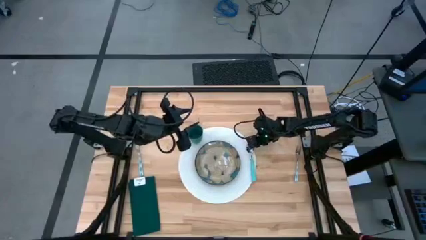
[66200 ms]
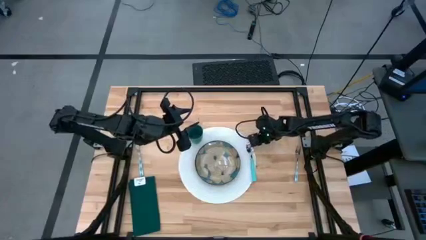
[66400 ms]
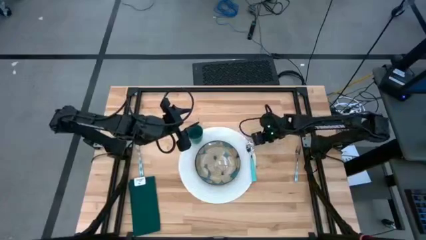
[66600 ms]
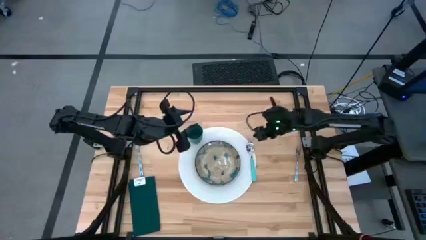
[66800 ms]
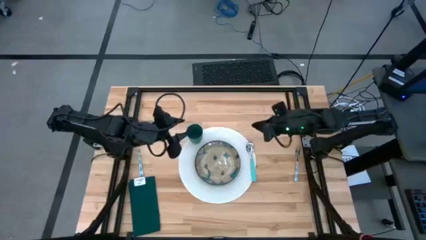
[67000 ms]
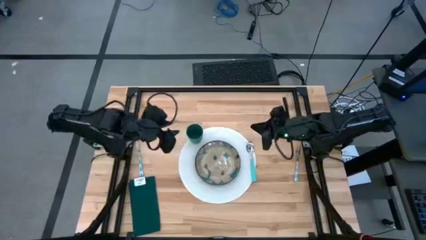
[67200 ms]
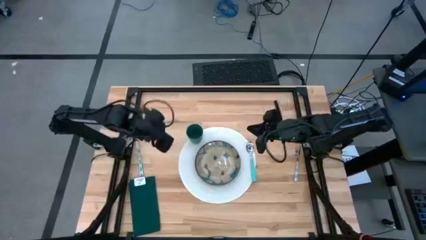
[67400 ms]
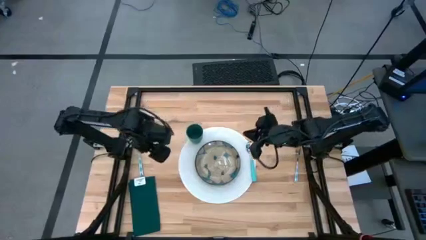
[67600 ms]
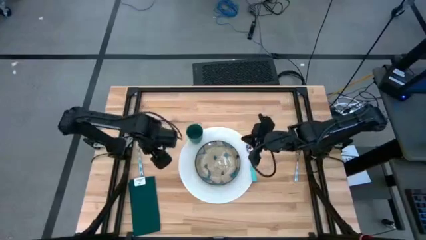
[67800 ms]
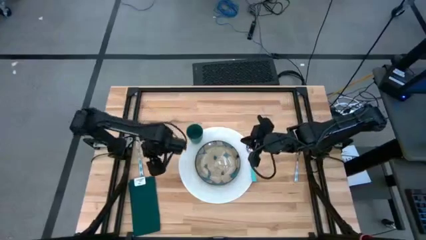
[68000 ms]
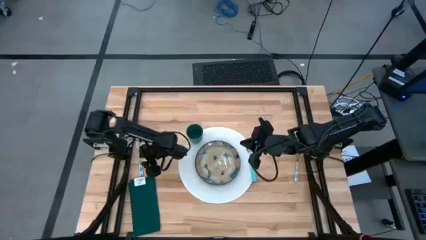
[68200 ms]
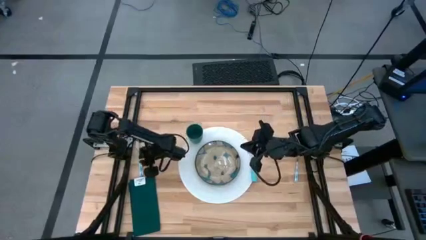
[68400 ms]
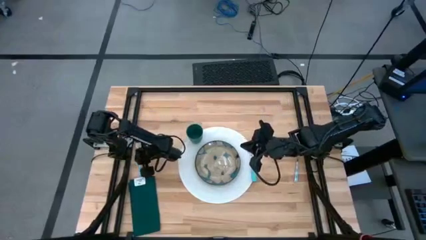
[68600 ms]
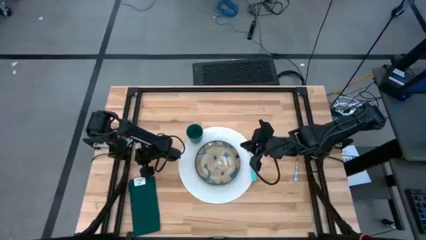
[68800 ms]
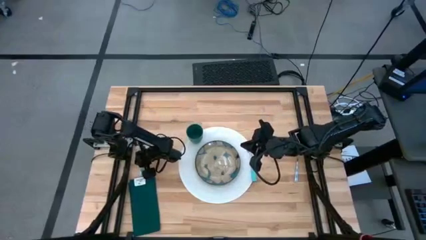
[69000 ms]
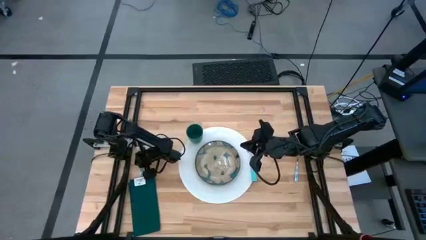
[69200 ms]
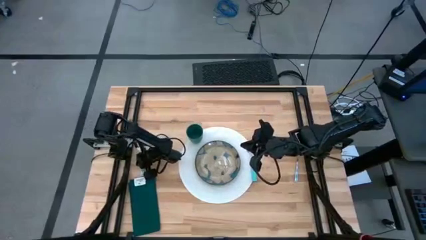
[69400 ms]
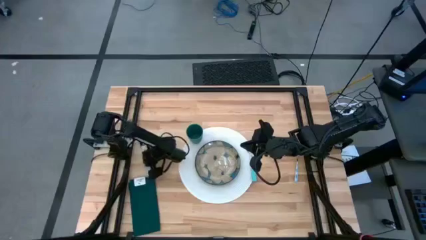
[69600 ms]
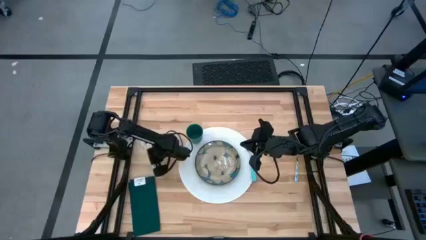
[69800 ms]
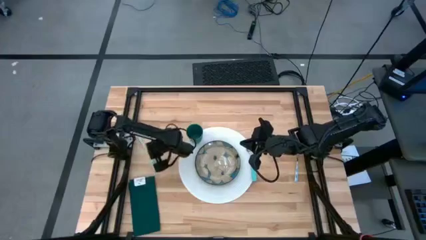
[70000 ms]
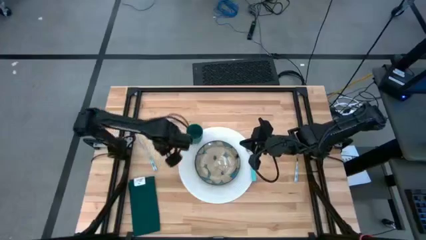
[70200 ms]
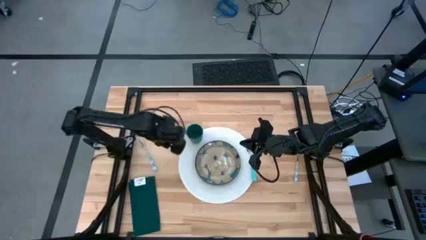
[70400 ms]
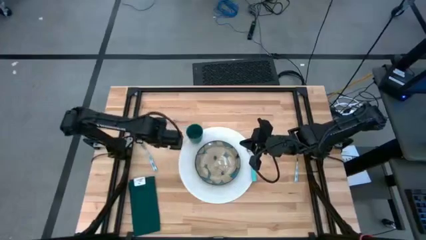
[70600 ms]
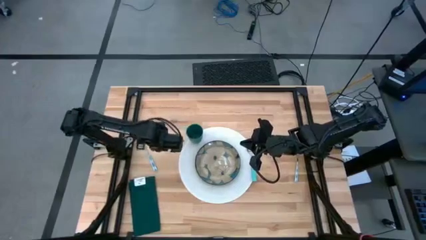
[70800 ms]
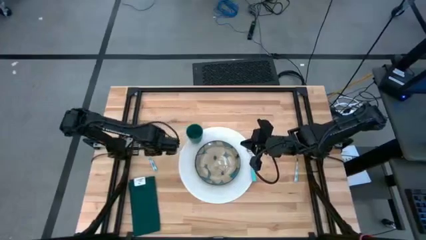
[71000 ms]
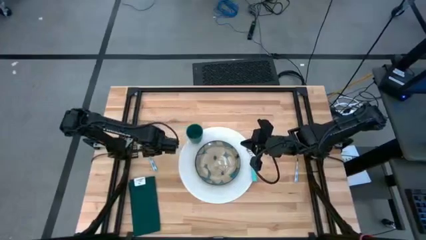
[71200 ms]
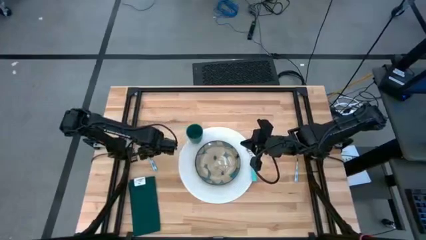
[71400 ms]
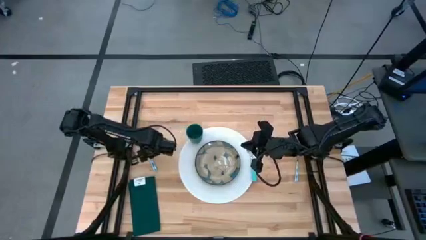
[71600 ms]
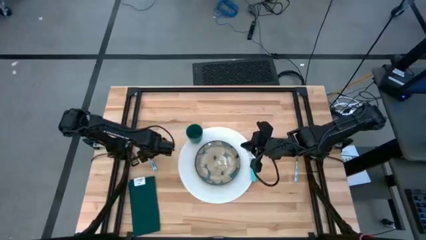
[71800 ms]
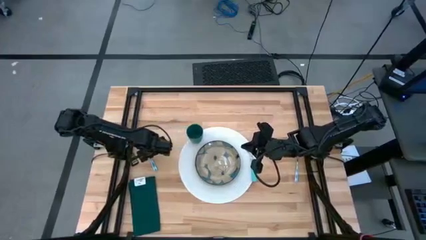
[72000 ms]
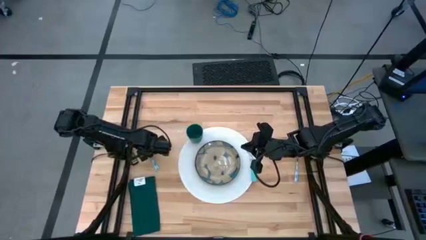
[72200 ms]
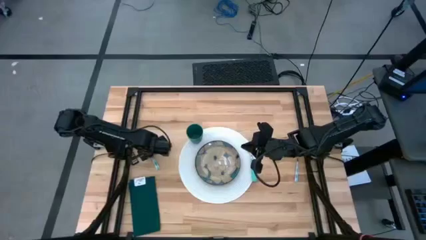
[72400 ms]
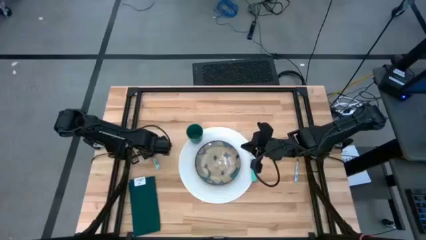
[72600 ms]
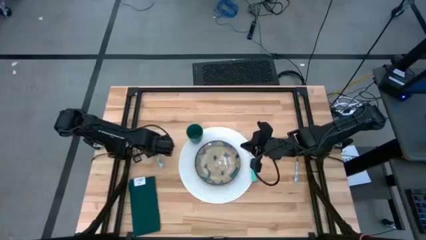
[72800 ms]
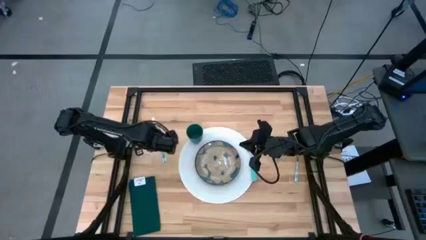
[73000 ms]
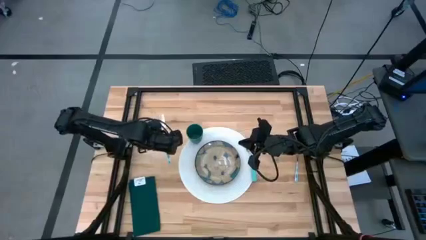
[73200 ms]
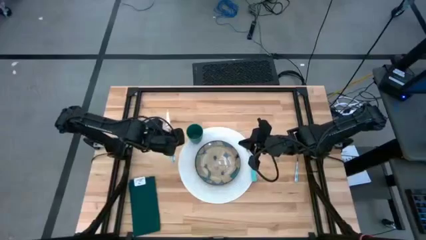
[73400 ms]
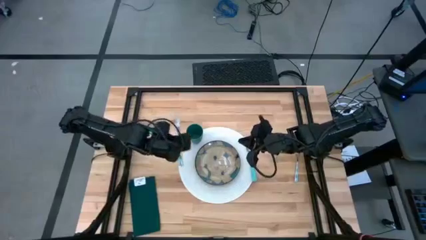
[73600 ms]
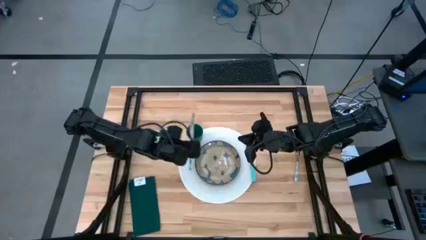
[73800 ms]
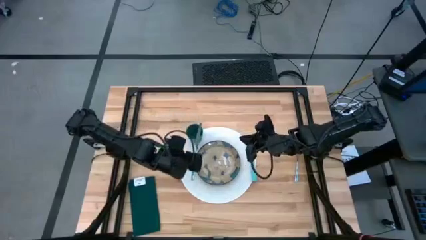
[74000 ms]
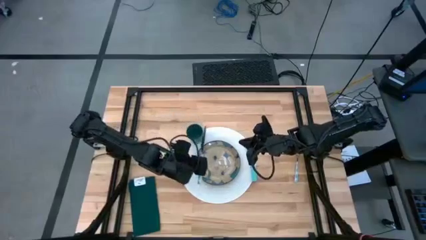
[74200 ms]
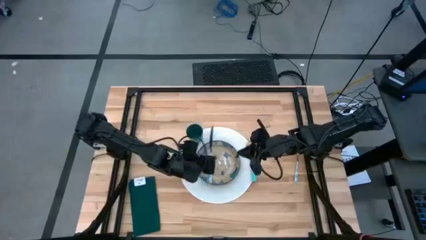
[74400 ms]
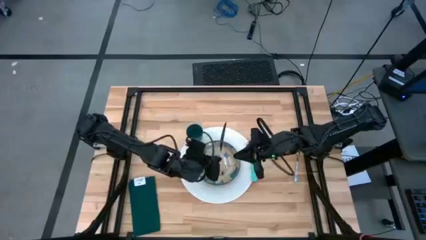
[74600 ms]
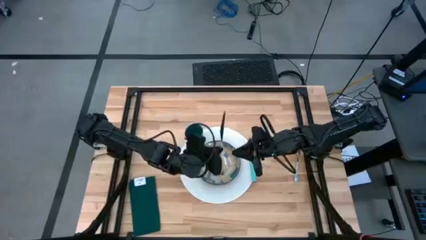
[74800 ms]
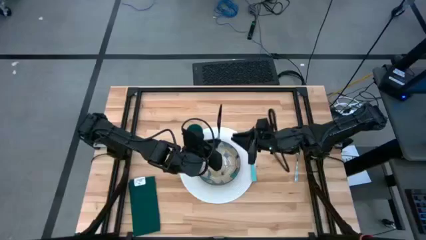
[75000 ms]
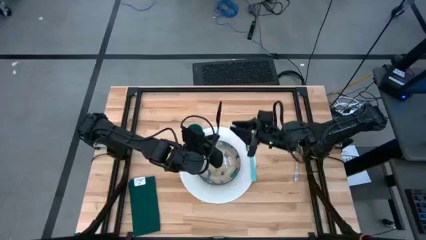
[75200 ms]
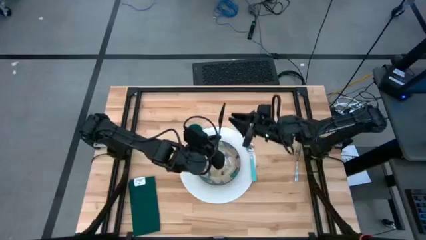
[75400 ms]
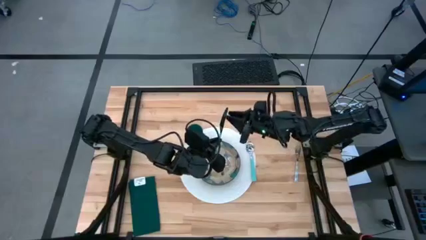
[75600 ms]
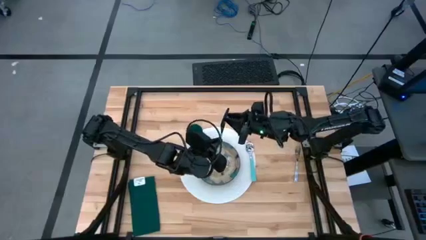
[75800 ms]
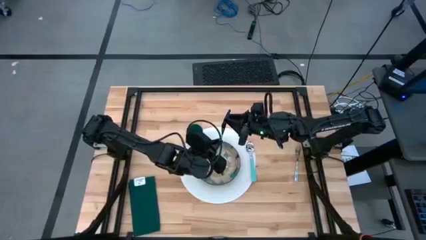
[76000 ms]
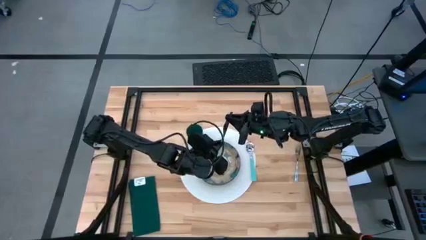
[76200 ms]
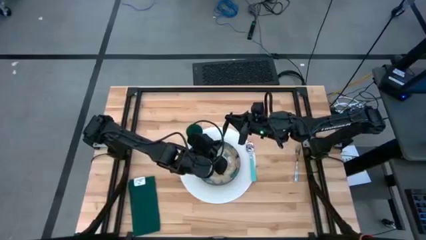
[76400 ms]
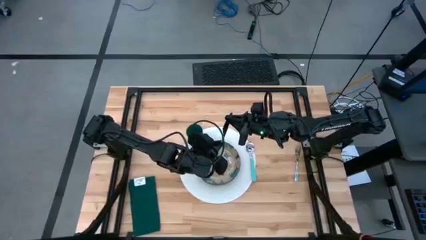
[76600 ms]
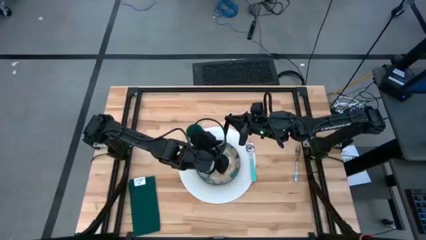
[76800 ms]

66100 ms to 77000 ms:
Task: Set table place
Put the blue knife on the right of the white table mat
